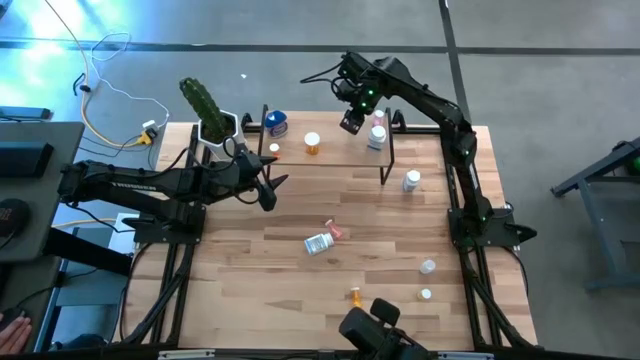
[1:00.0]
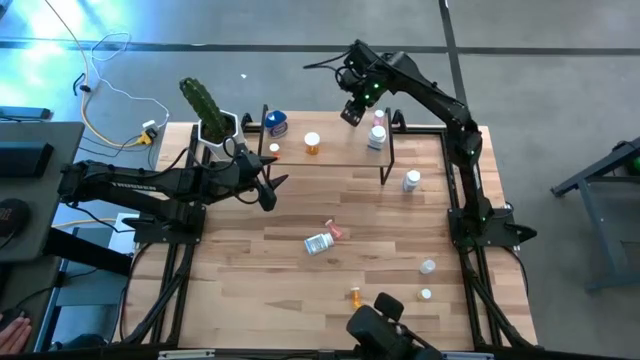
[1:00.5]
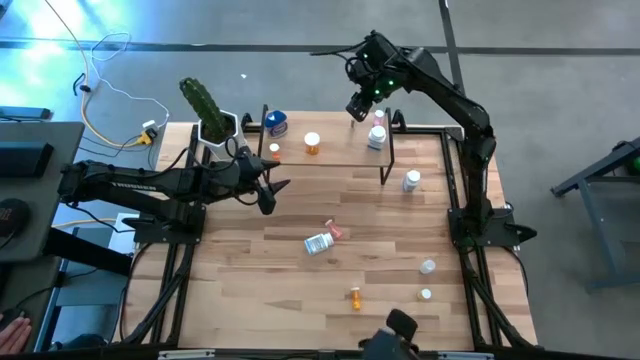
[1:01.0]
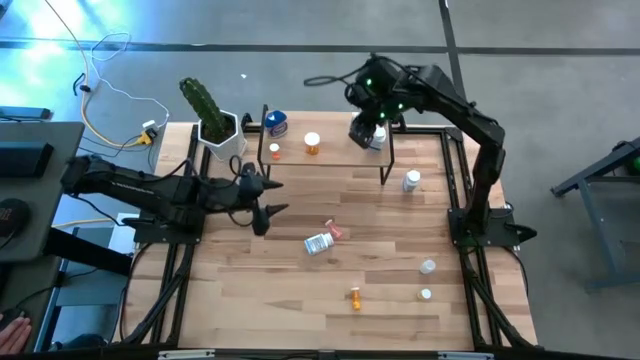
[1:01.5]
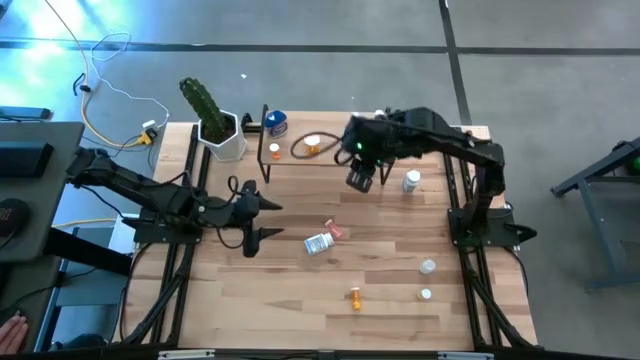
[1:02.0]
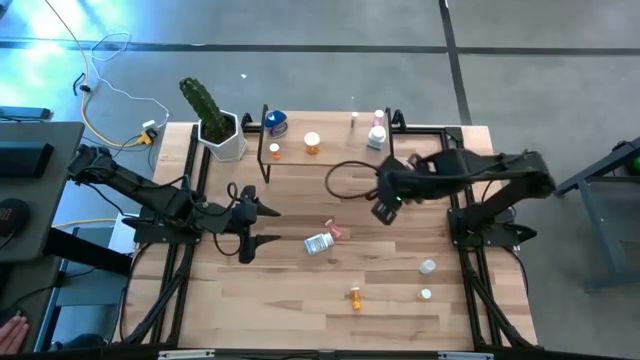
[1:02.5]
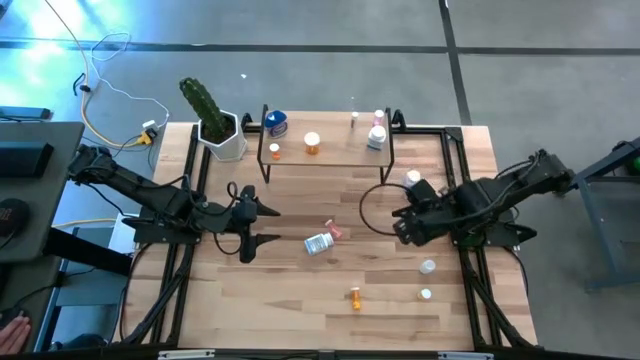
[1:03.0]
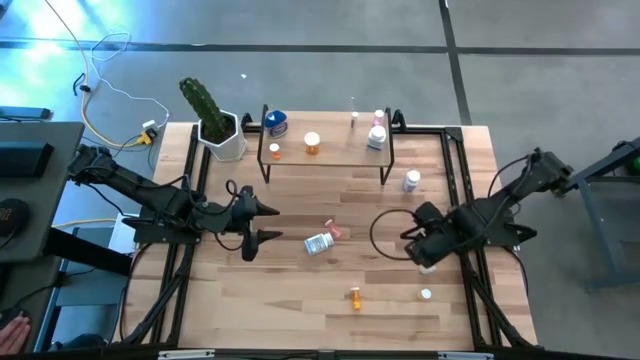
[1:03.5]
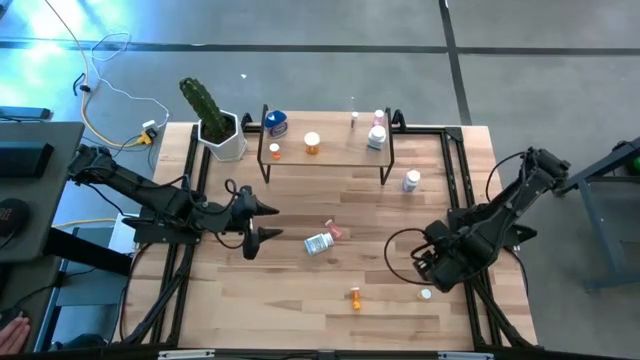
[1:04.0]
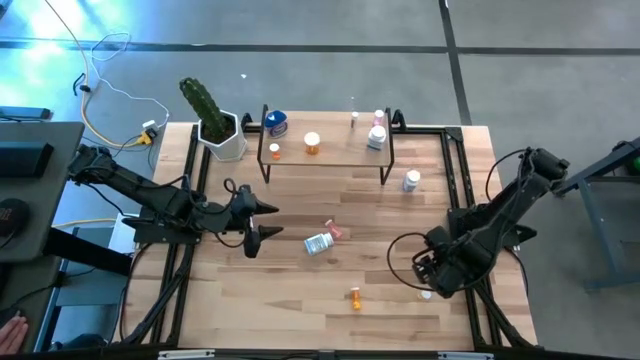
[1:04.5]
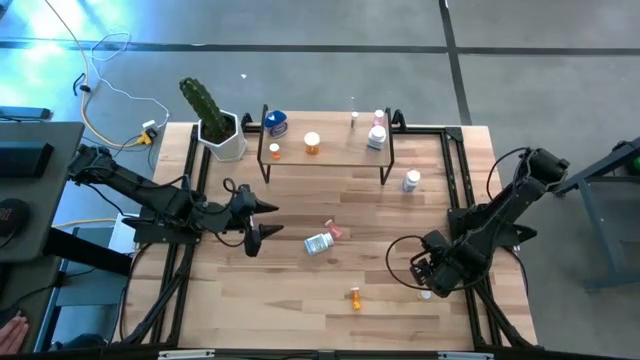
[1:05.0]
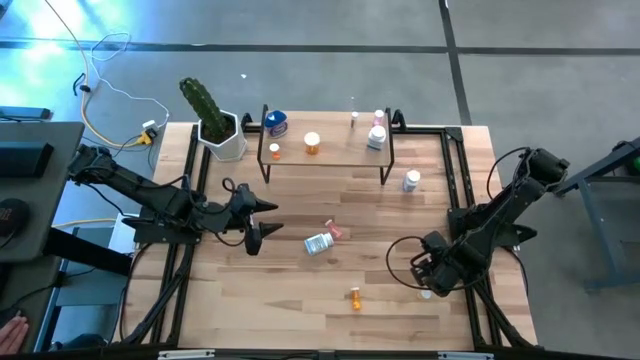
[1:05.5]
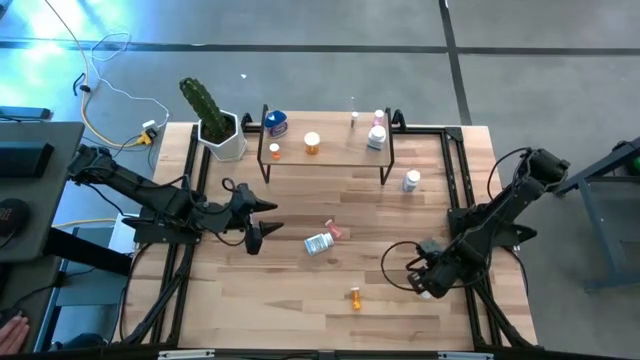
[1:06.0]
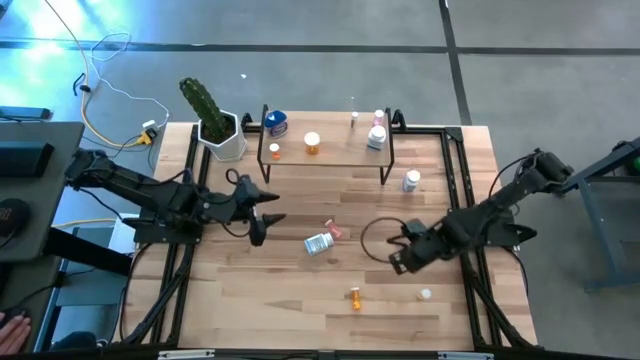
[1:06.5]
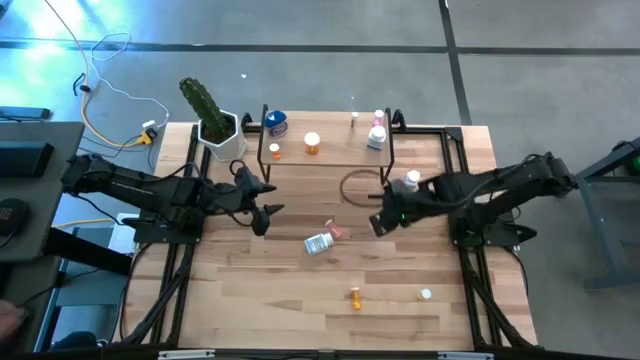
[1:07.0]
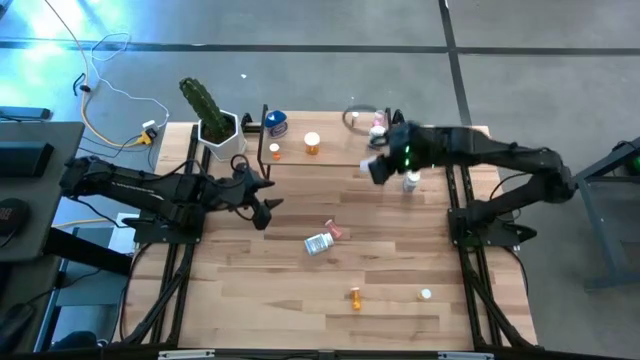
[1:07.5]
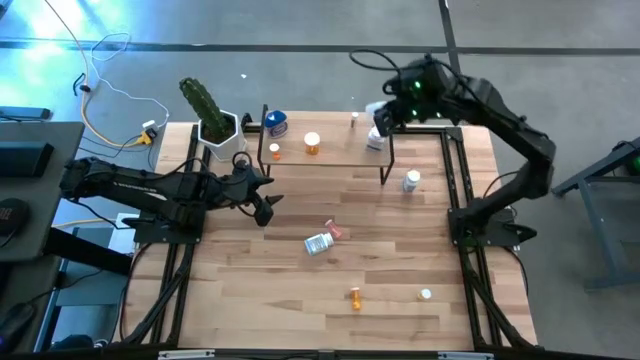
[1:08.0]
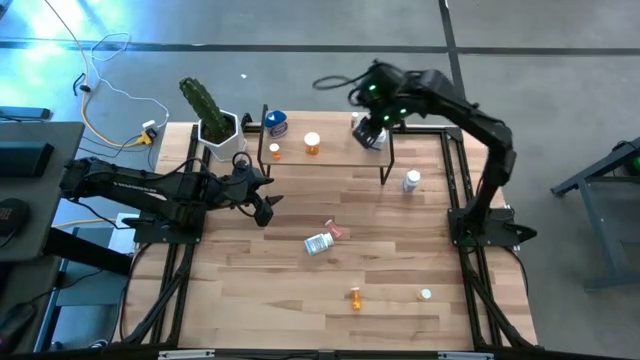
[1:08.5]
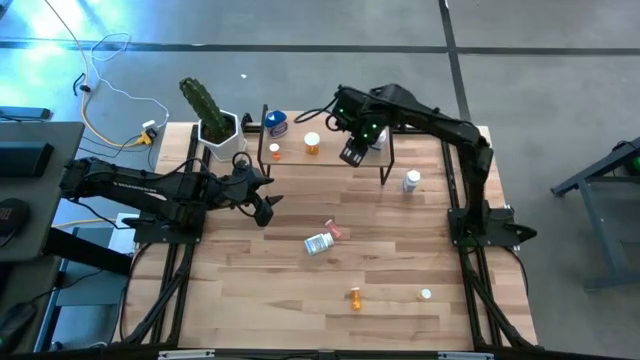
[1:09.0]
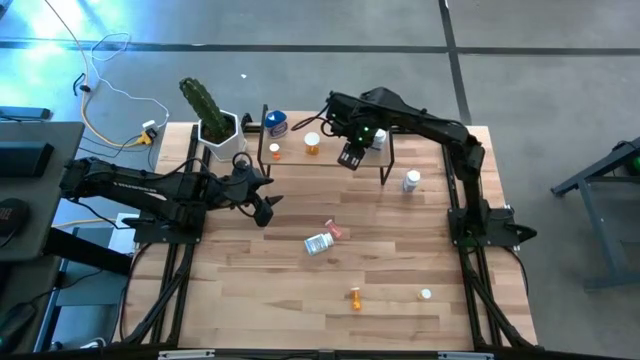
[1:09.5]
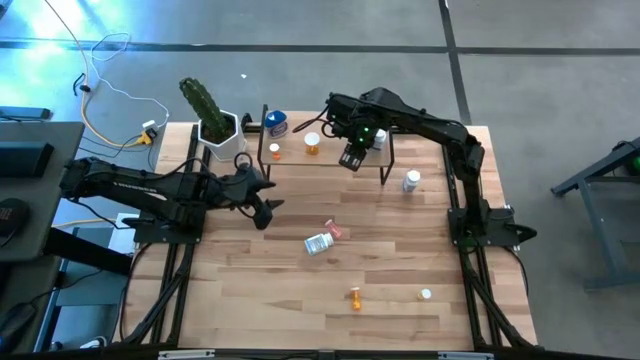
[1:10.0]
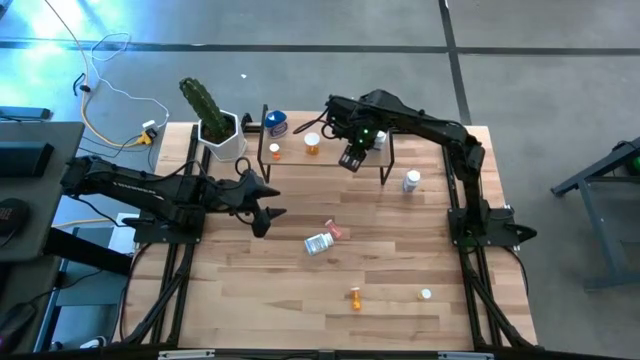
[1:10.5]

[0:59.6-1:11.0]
Task: Pick and place medicine bottles onto shelf by color
Put the transparent pill bottle on the shelf

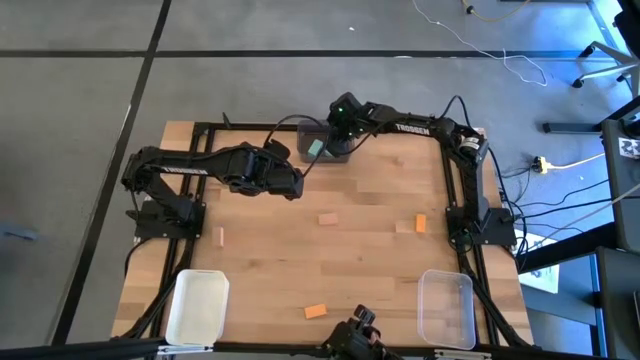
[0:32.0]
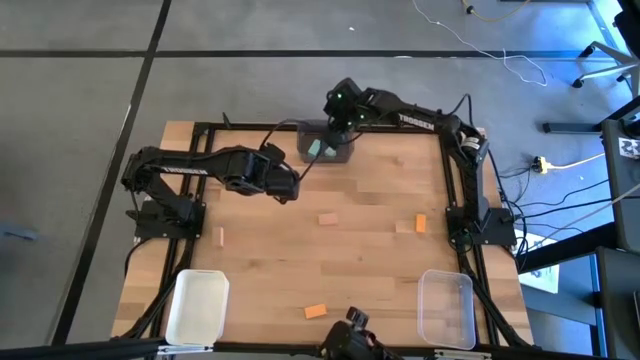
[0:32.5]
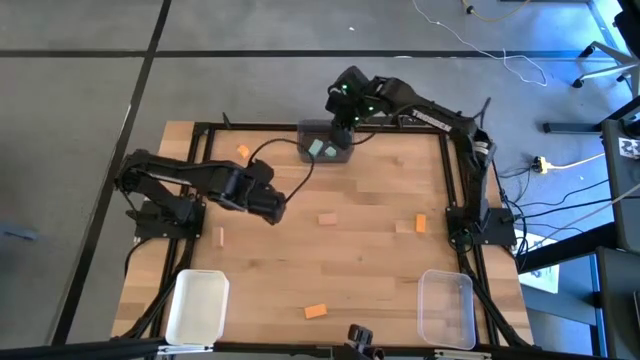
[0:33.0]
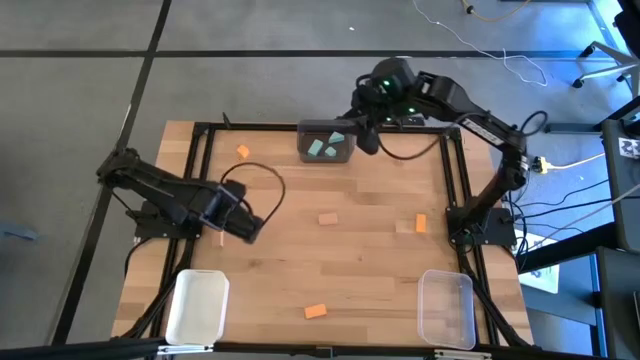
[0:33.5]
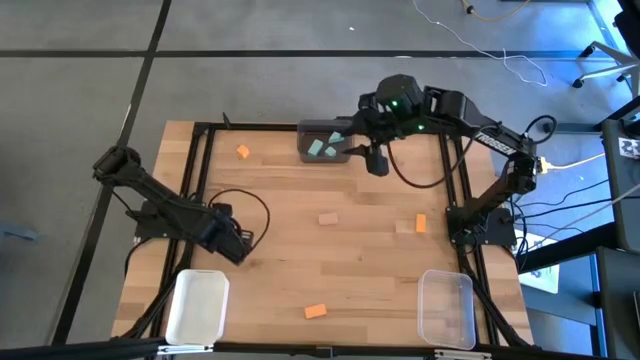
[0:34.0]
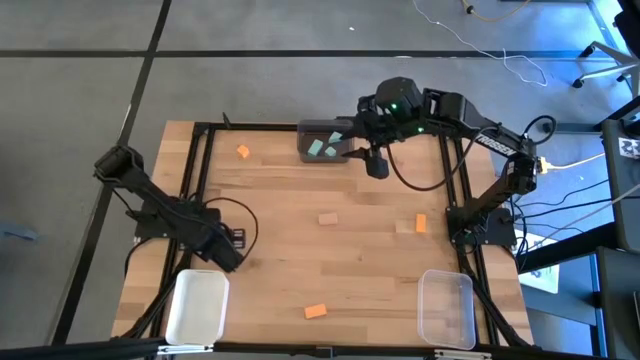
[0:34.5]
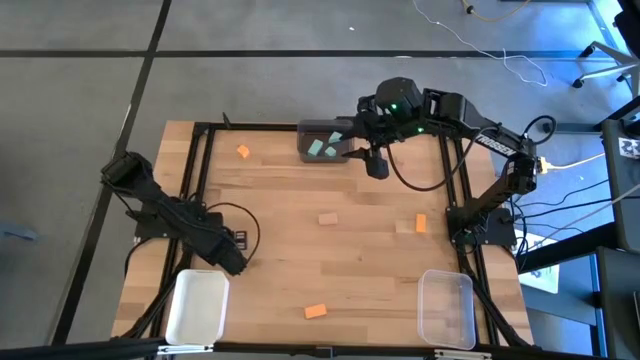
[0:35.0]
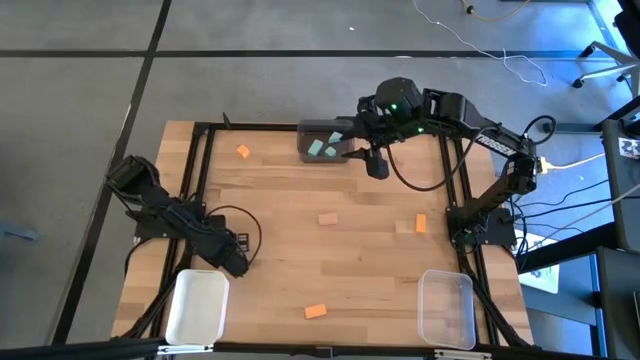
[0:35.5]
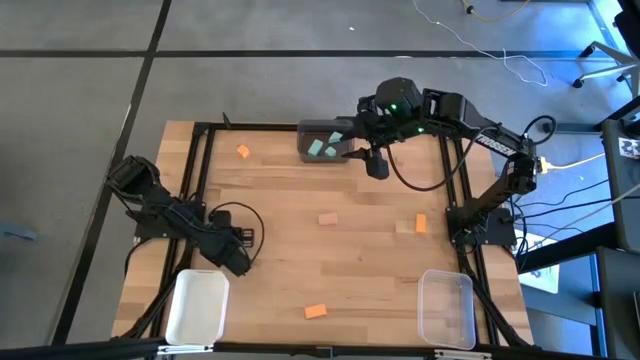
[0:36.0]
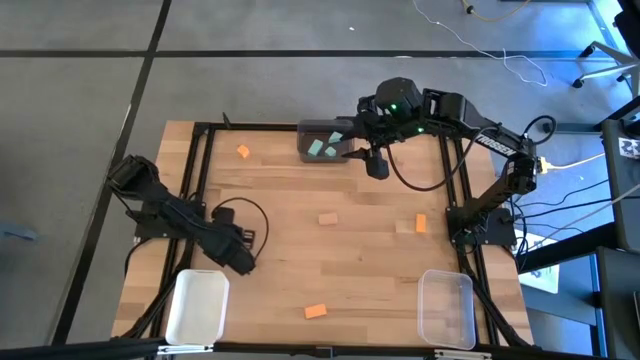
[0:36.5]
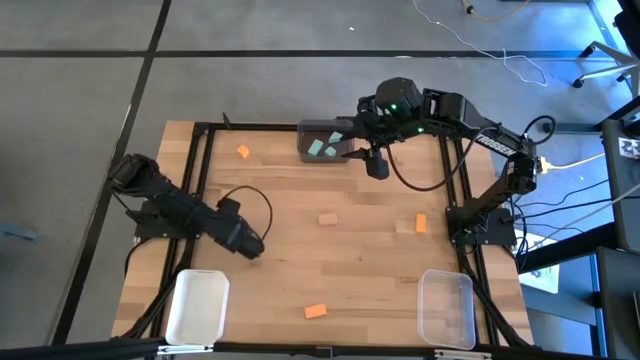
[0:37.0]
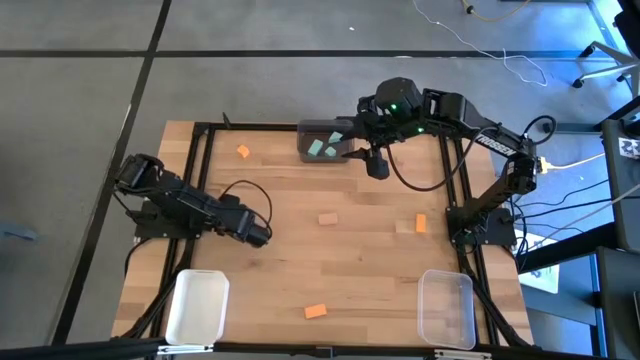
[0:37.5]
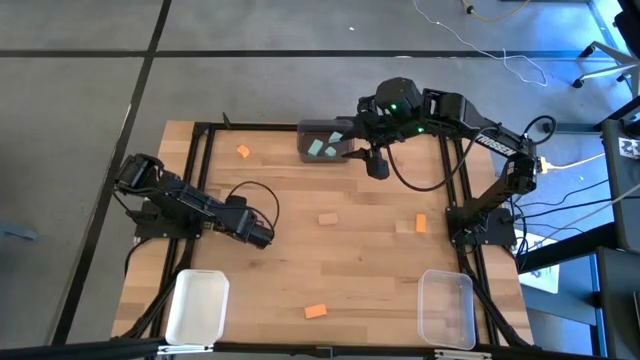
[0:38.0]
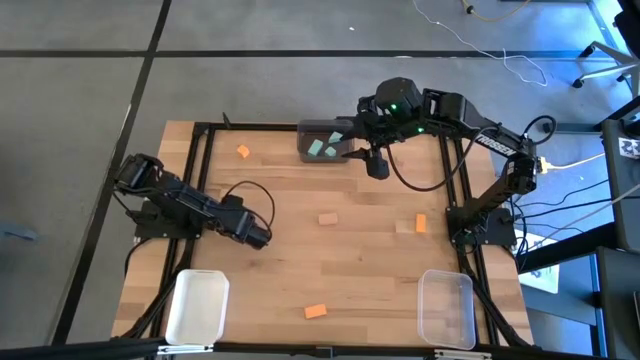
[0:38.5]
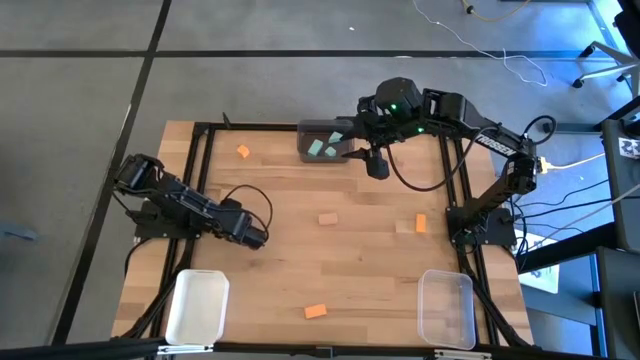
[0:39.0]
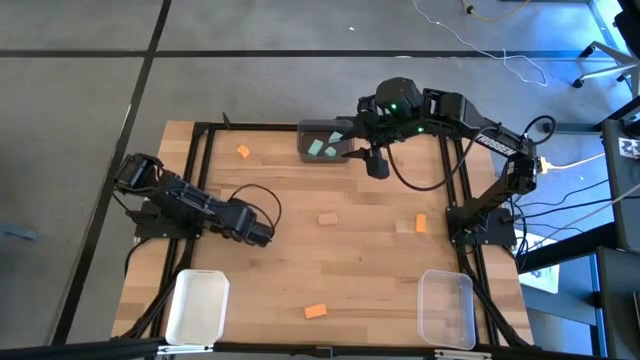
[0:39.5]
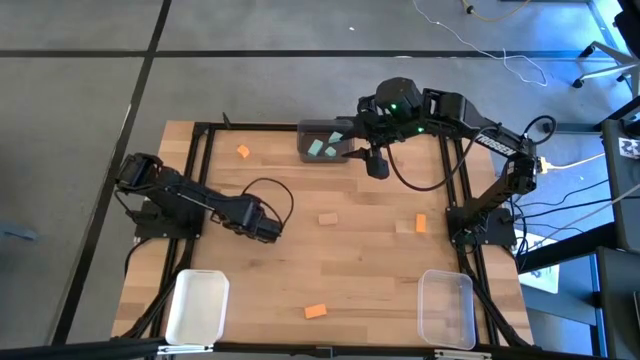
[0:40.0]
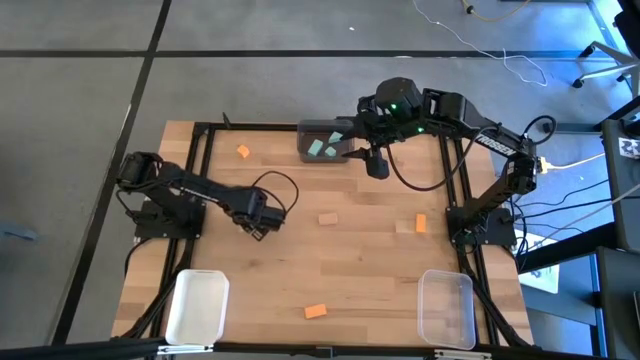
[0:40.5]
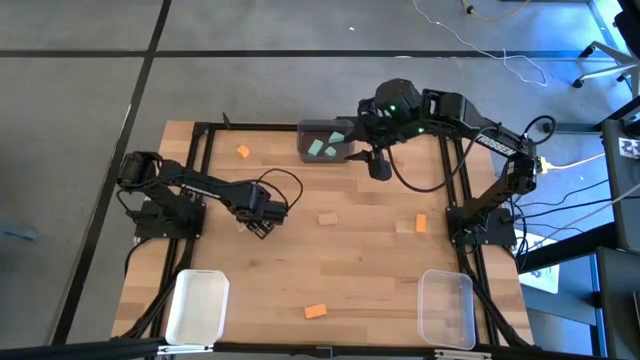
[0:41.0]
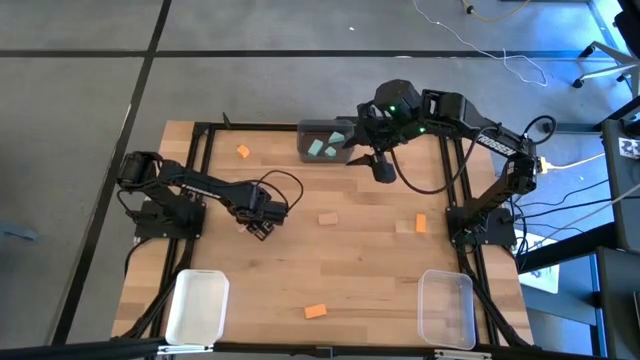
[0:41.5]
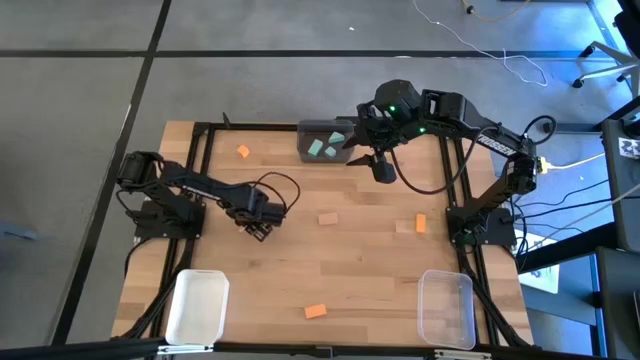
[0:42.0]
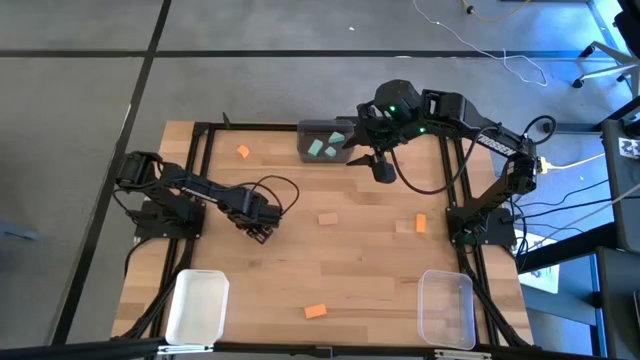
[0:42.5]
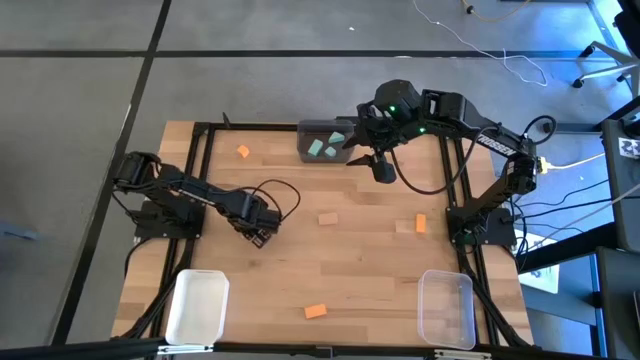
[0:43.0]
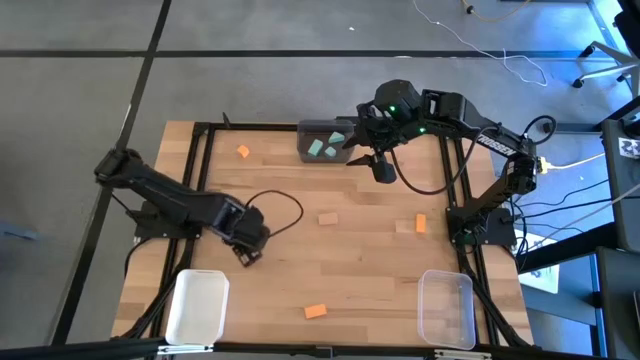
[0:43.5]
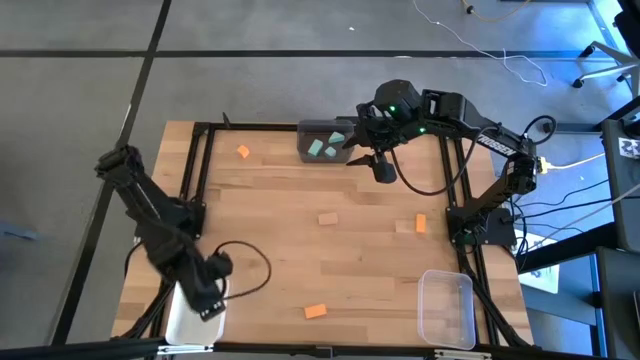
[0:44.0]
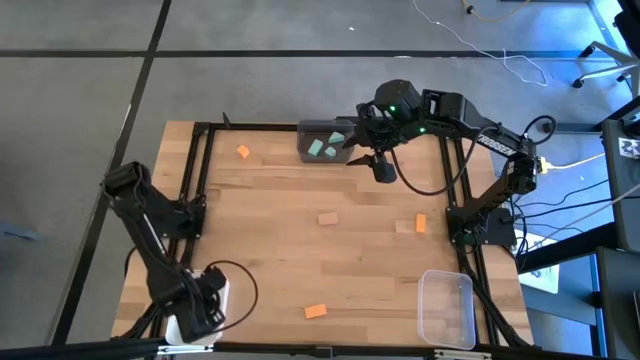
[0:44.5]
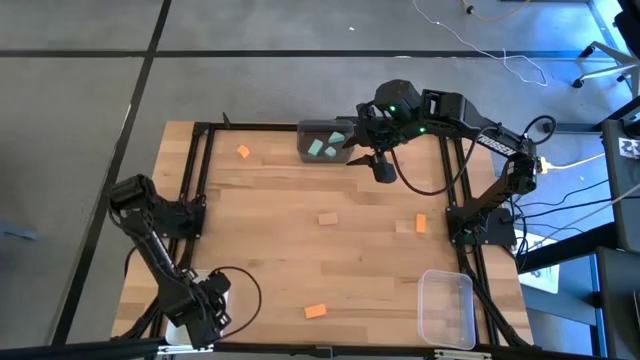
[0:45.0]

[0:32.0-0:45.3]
Task: Sort & place blocks by color
Put the bottom left brown block into the white bin
